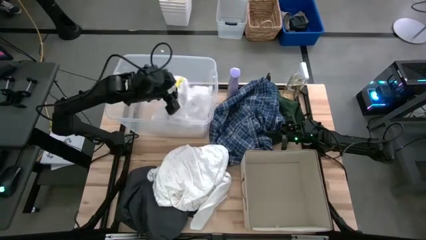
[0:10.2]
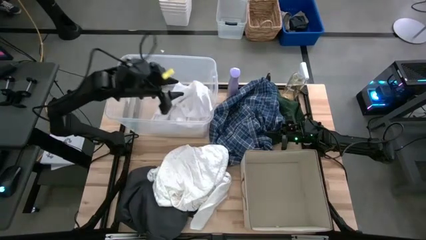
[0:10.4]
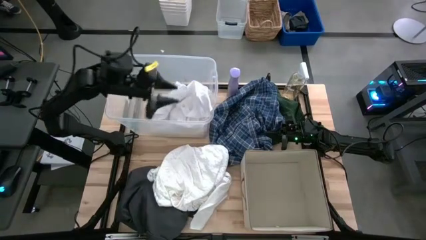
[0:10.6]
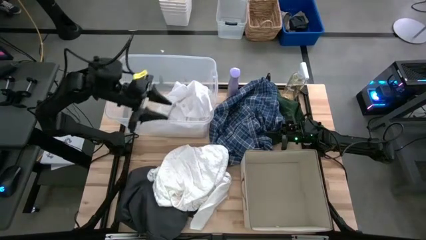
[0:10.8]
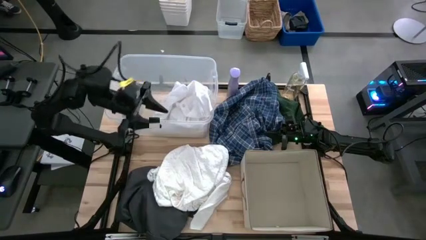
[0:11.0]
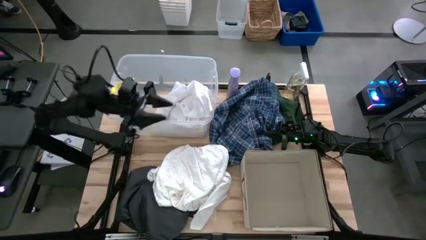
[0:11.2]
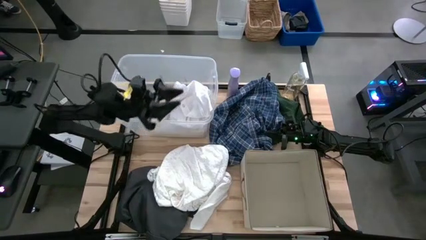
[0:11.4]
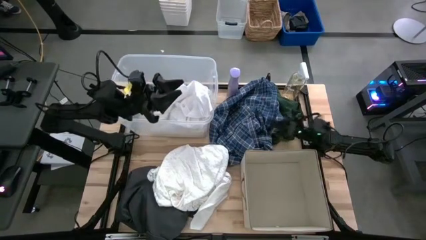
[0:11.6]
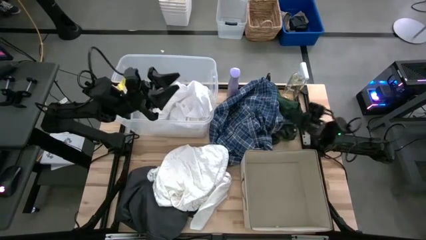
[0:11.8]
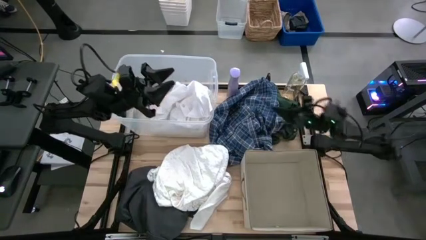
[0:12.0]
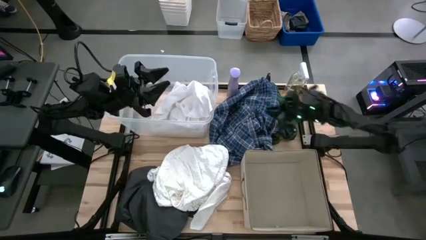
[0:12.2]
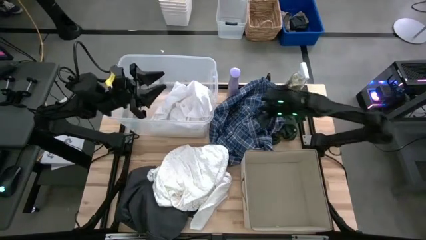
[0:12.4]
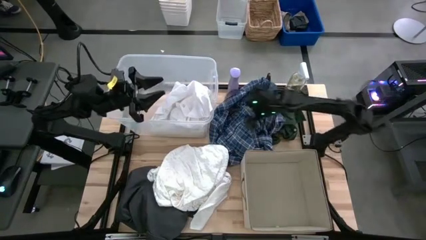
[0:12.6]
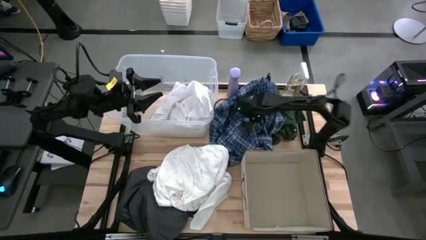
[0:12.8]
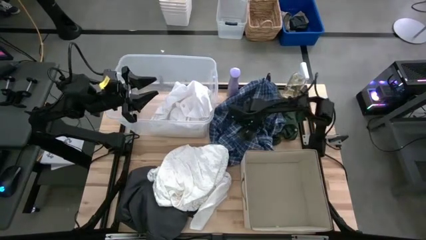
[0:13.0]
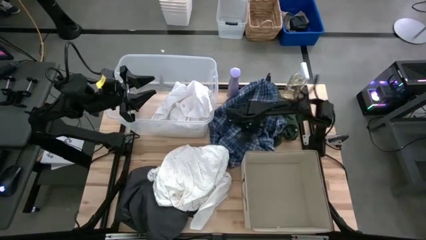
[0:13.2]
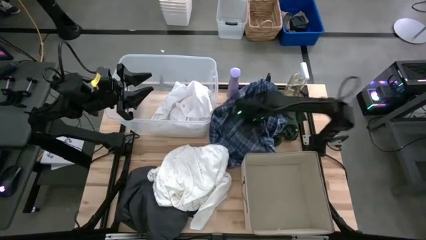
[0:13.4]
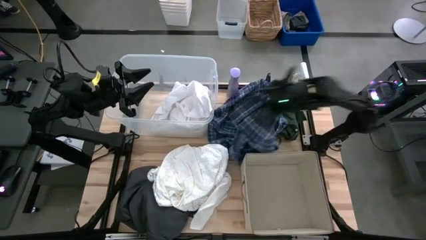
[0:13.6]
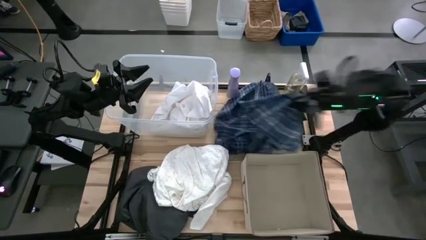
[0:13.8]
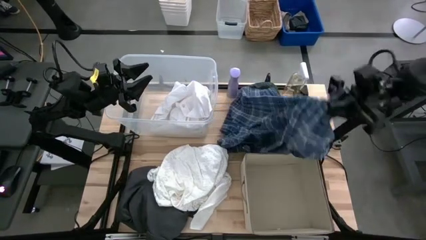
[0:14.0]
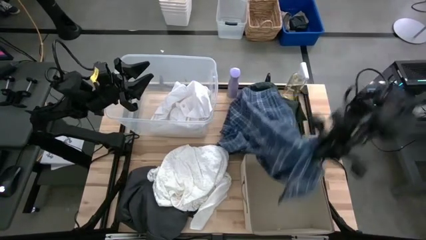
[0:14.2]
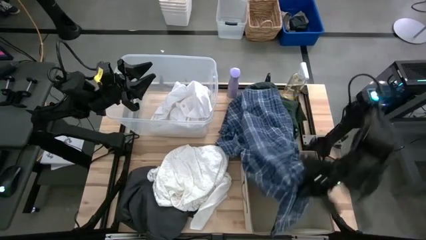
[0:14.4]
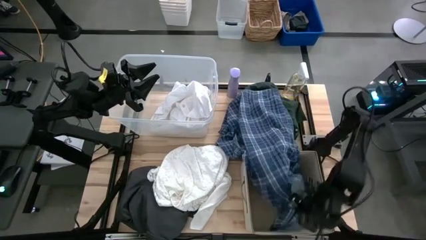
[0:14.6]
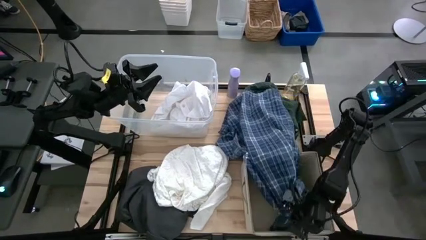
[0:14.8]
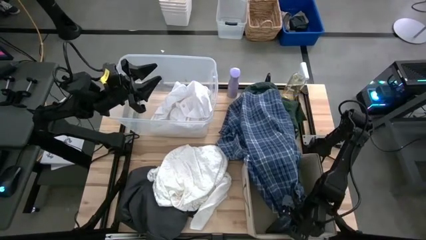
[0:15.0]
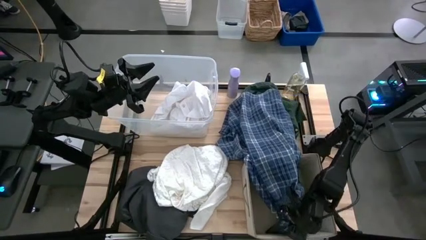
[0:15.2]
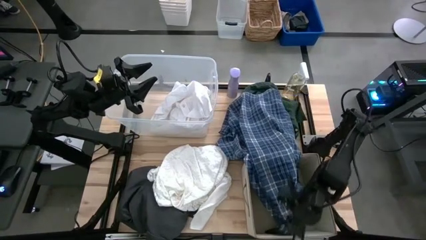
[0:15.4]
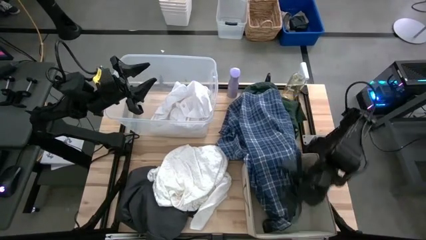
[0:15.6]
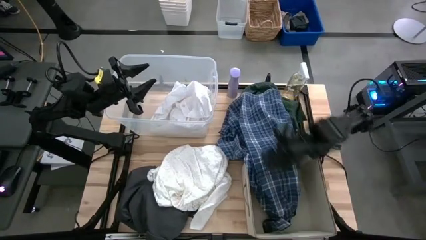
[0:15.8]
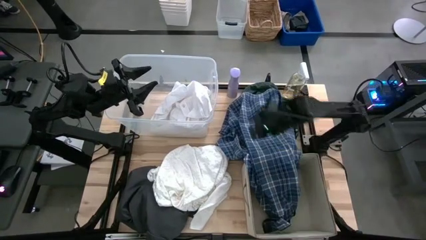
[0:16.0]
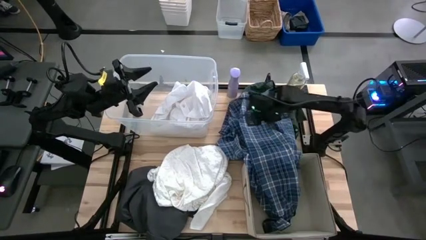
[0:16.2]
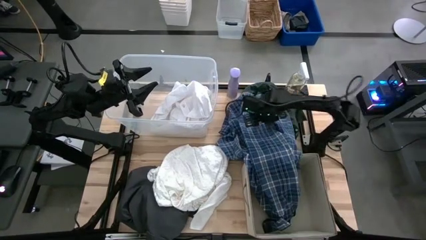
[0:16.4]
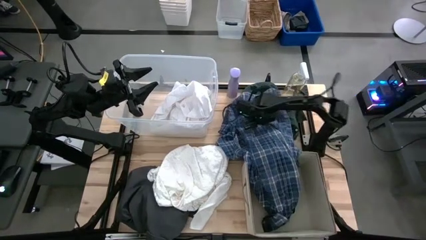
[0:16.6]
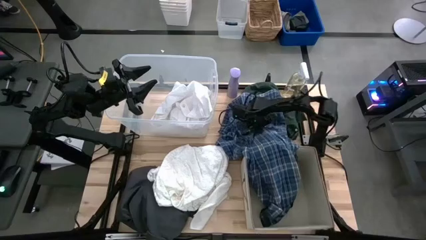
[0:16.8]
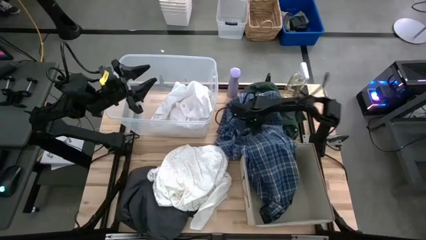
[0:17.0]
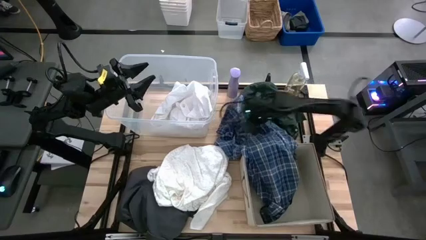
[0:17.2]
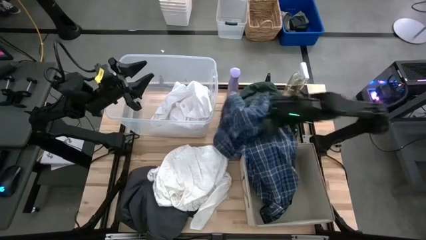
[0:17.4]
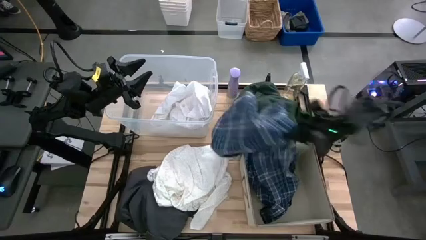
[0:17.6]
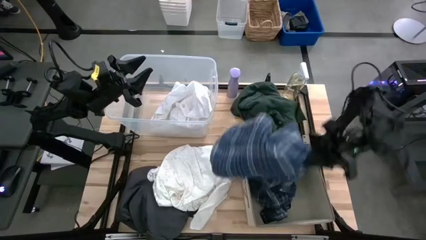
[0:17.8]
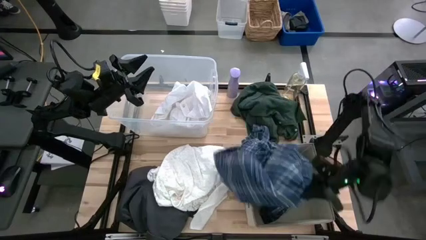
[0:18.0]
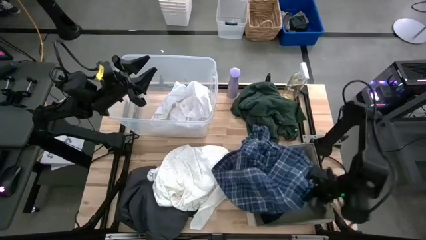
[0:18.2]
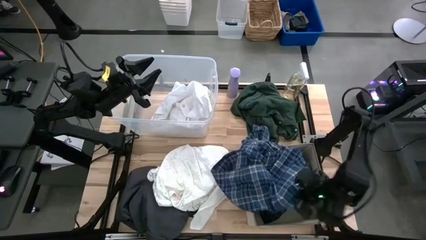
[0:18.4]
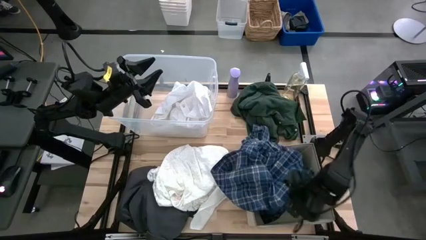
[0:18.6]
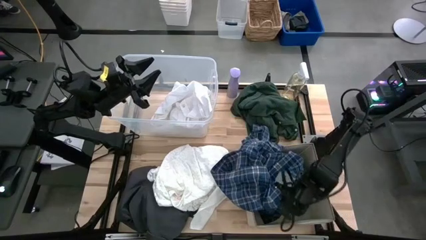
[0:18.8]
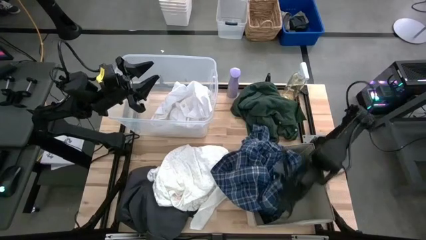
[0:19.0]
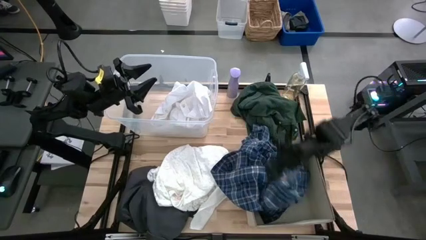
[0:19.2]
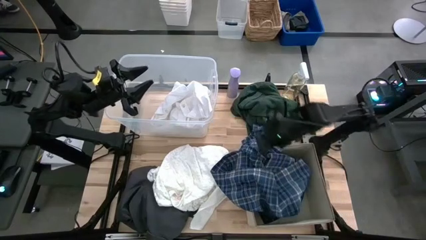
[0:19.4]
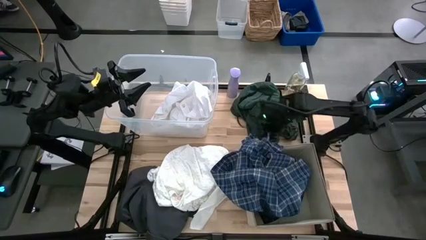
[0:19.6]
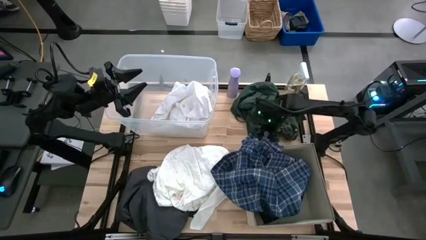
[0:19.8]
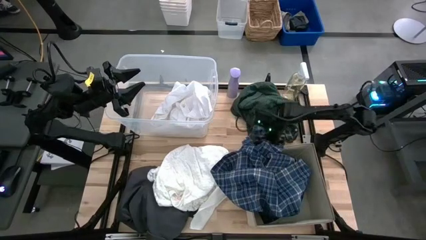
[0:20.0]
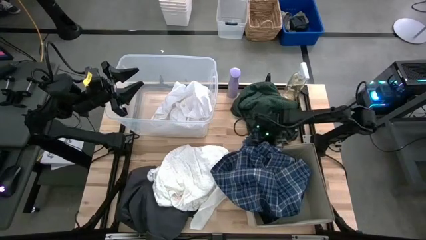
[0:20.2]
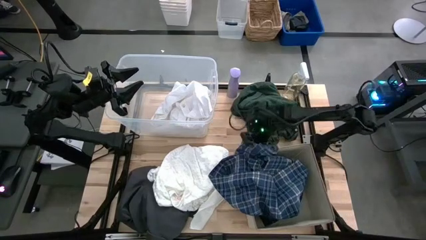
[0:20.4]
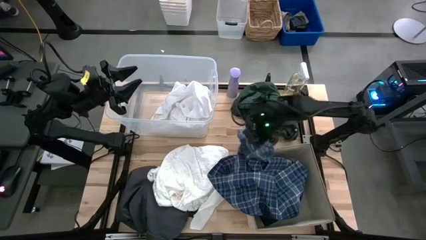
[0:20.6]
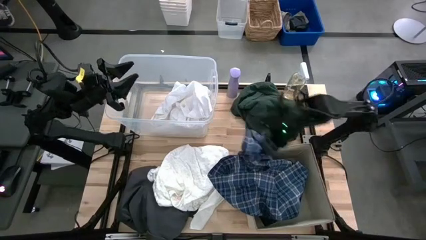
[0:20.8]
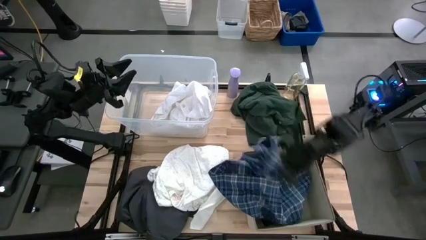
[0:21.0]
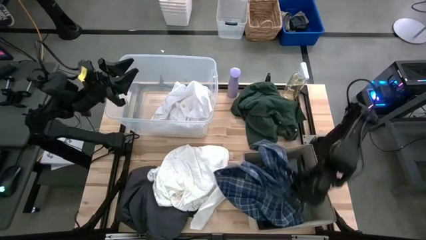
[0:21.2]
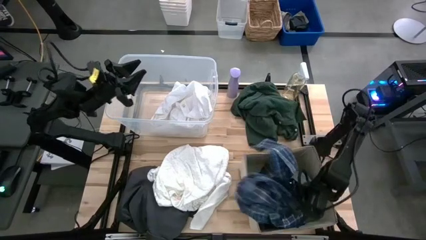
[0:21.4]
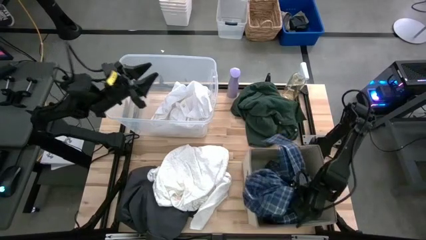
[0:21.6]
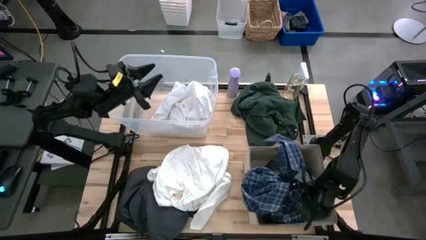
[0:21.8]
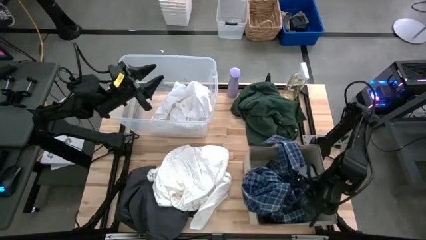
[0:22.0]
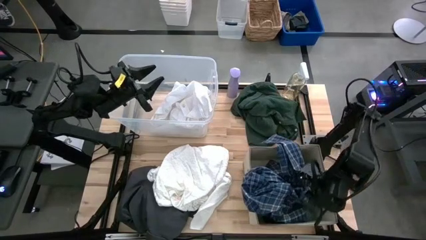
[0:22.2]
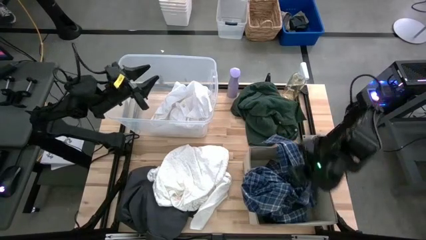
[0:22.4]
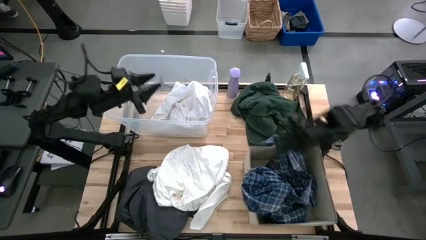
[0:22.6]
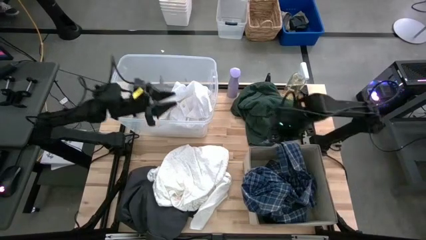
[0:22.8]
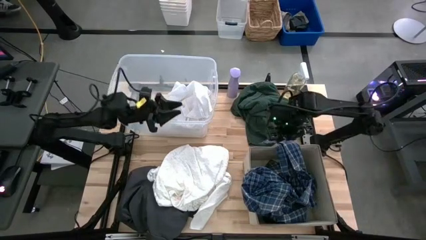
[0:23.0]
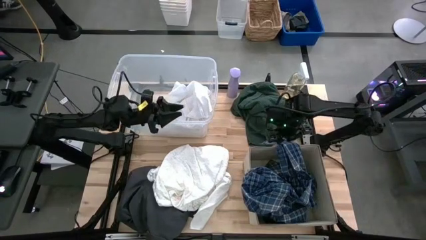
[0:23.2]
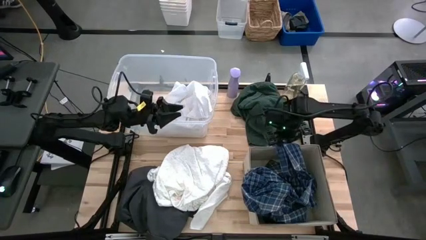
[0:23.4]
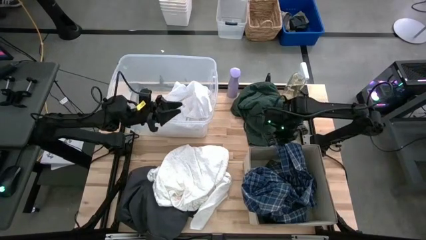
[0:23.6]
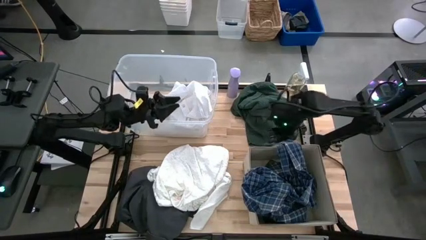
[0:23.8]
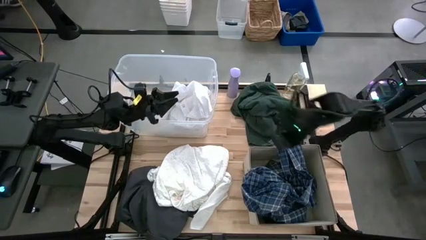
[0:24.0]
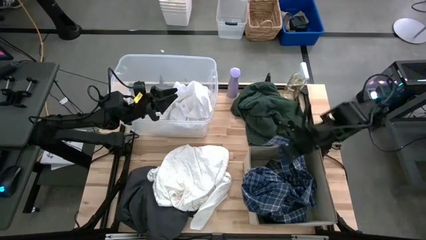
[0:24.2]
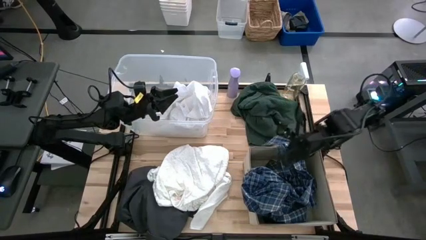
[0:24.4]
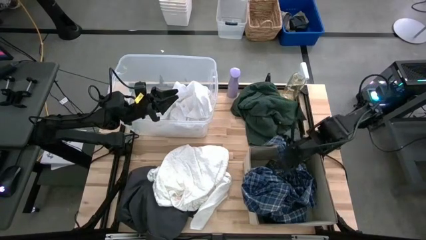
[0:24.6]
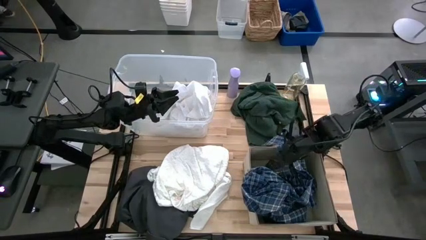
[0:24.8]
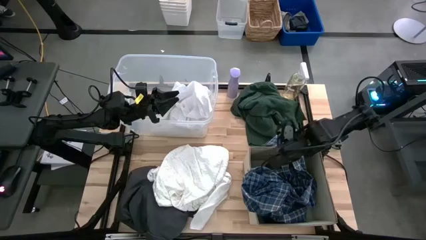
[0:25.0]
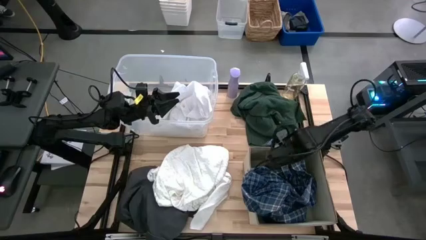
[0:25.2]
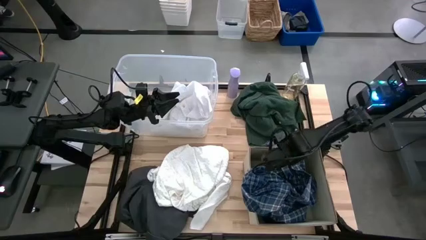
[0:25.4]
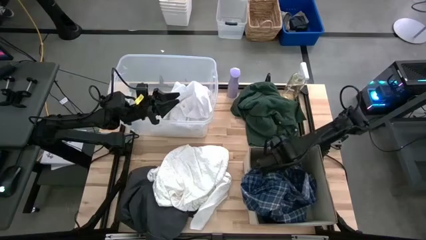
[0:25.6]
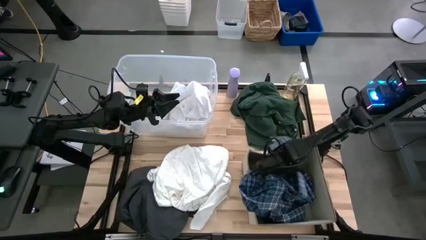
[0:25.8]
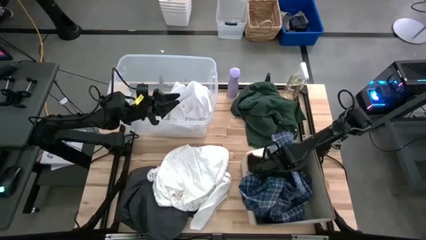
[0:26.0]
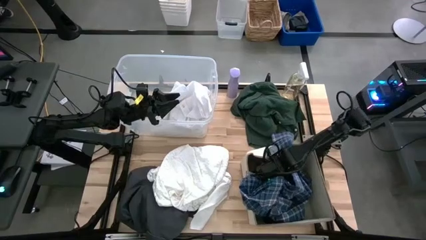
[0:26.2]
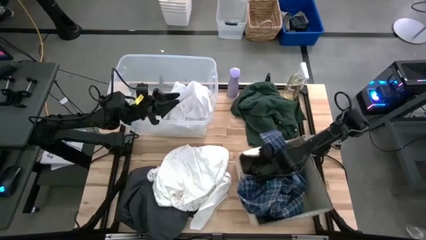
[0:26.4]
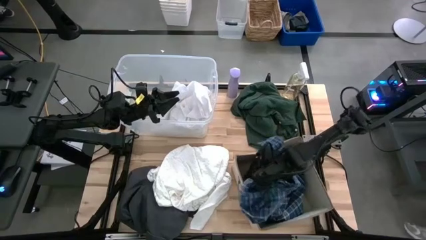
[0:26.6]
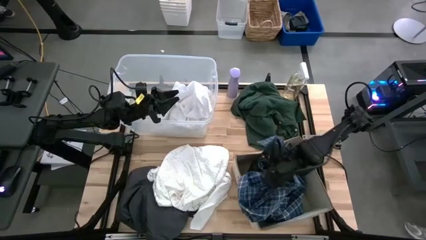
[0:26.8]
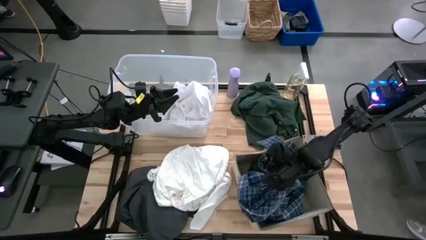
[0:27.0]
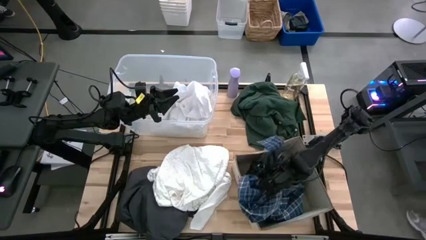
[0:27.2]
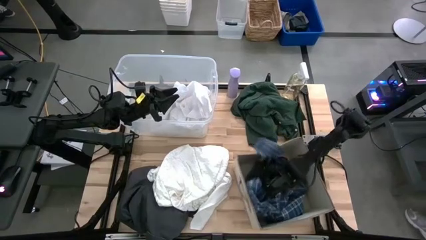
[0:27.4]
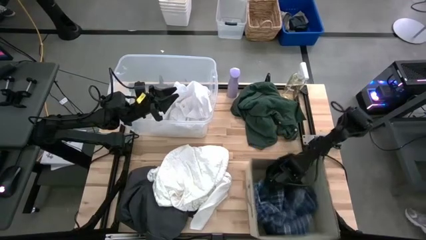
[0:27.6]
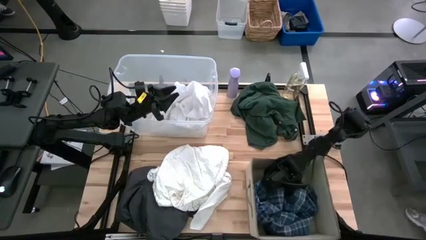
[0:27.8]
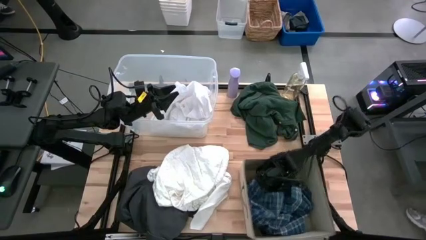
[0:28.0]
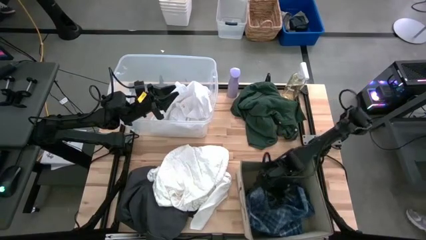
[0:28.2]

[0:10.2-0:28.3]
Task: Sort clothes
Put the blue polo shirt into the laundry bin
